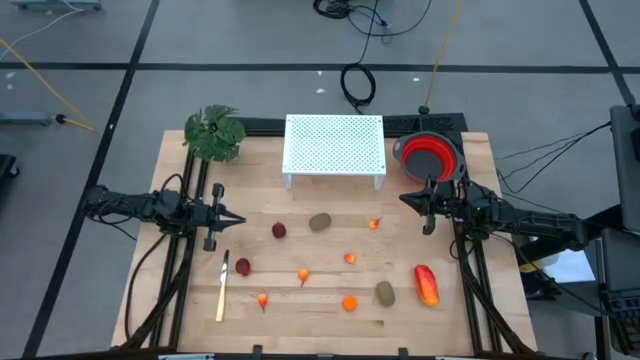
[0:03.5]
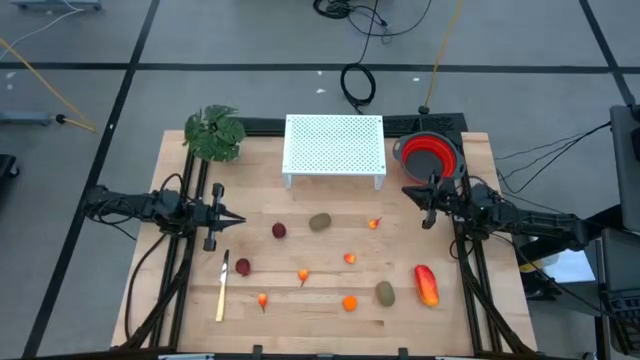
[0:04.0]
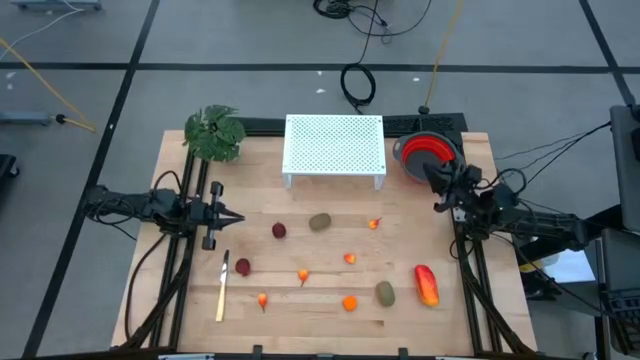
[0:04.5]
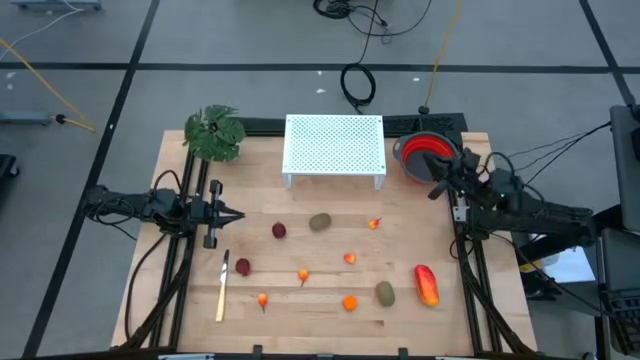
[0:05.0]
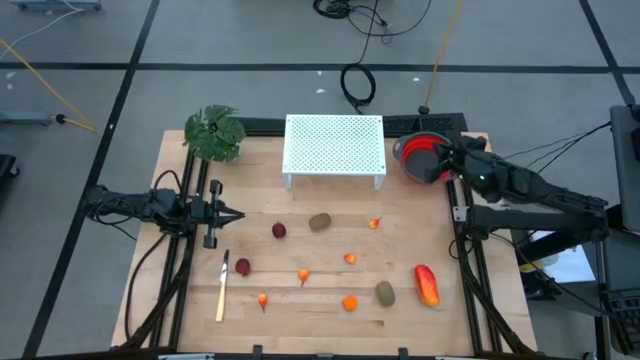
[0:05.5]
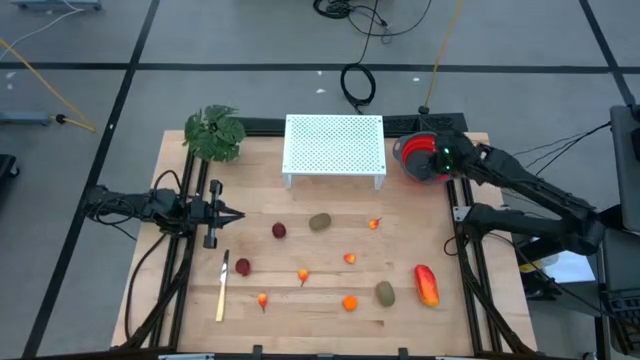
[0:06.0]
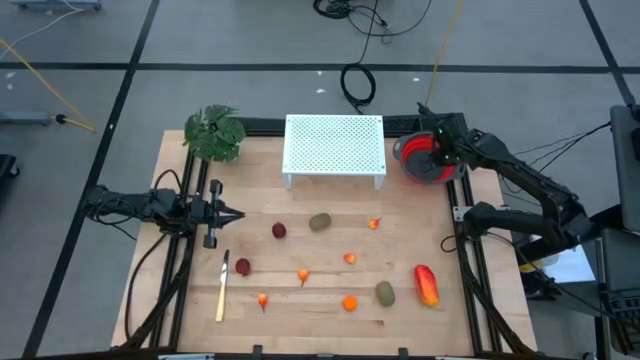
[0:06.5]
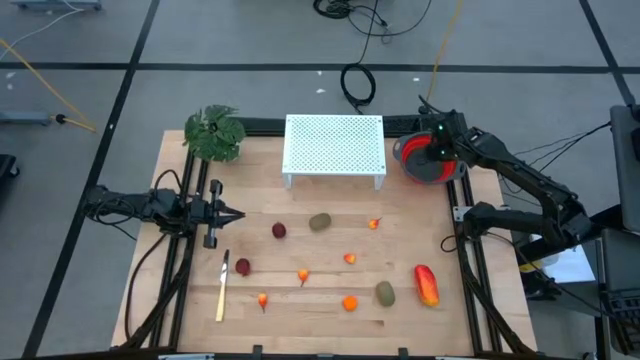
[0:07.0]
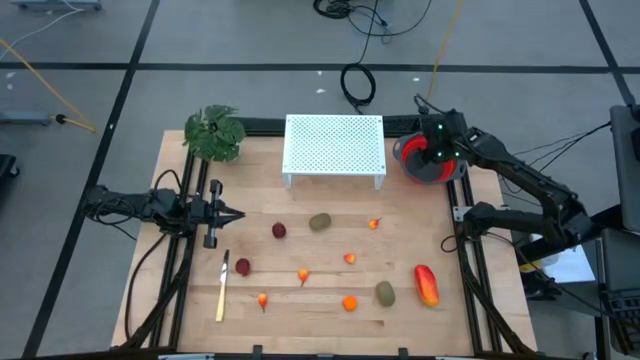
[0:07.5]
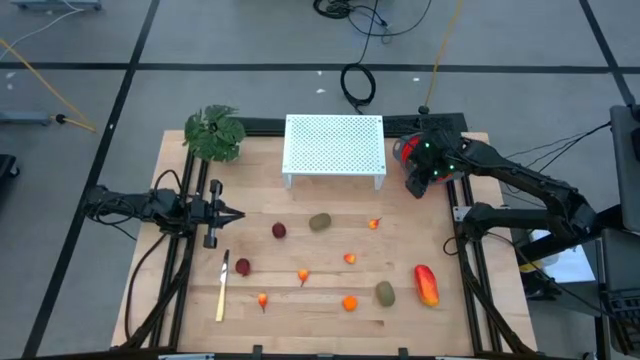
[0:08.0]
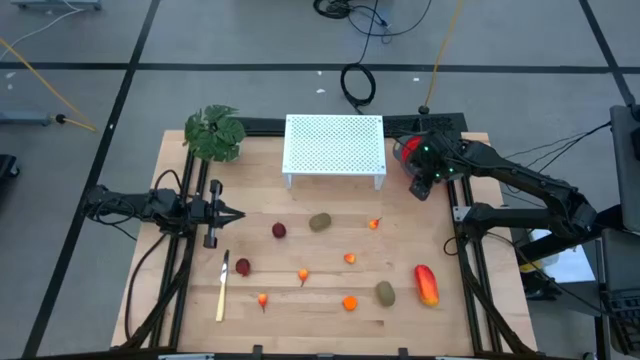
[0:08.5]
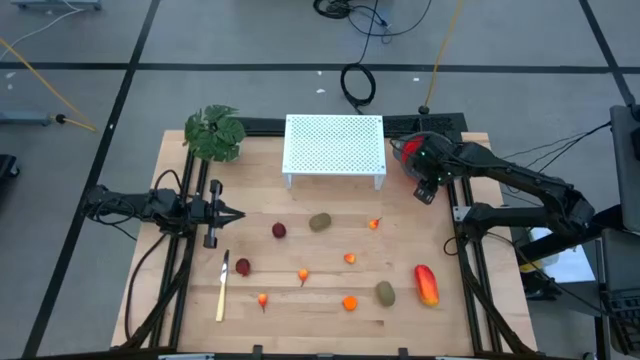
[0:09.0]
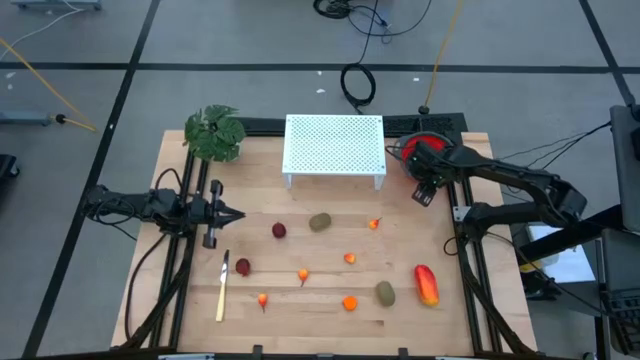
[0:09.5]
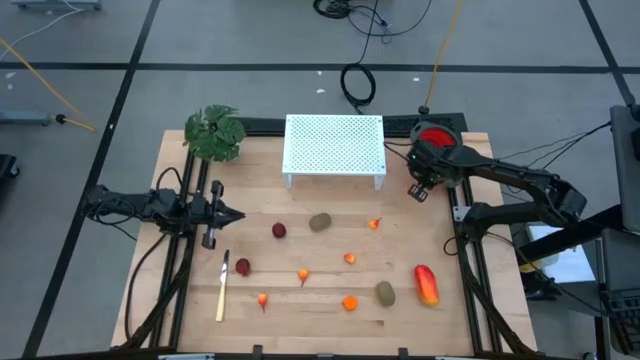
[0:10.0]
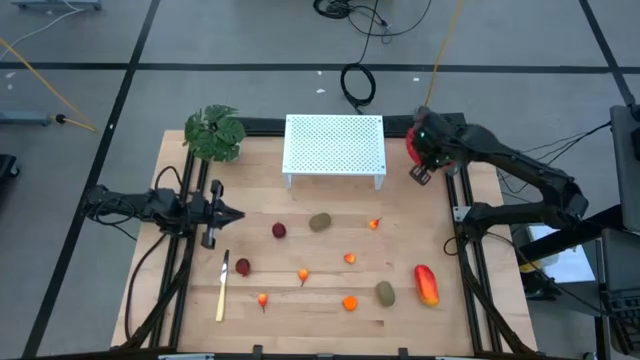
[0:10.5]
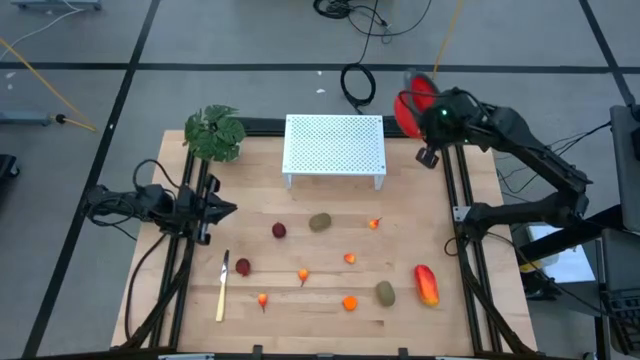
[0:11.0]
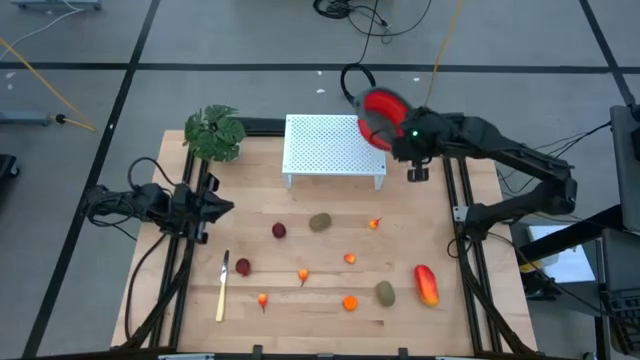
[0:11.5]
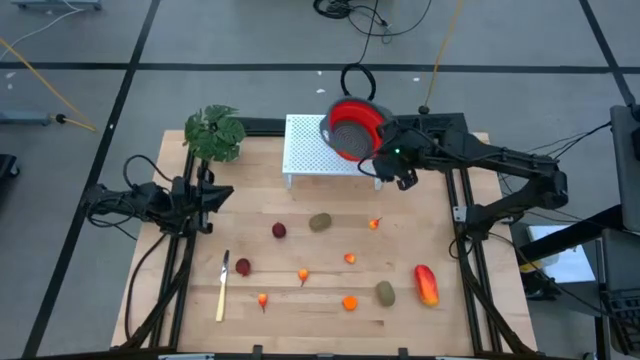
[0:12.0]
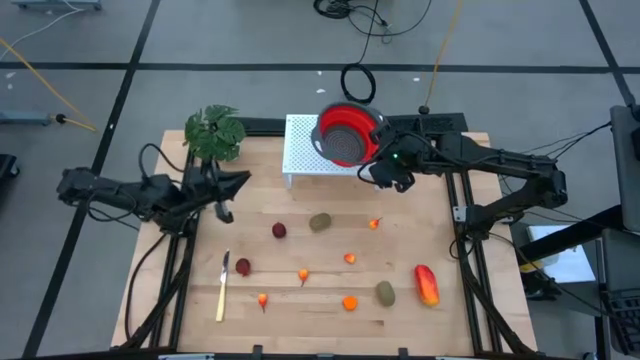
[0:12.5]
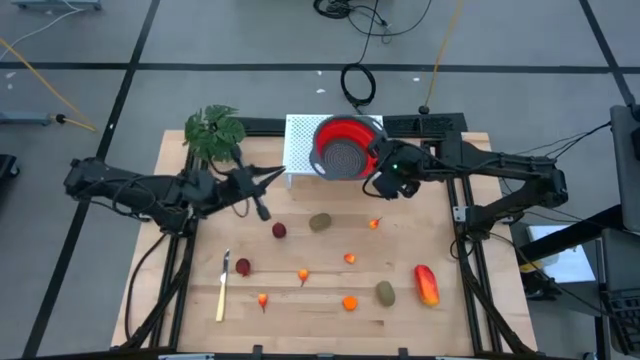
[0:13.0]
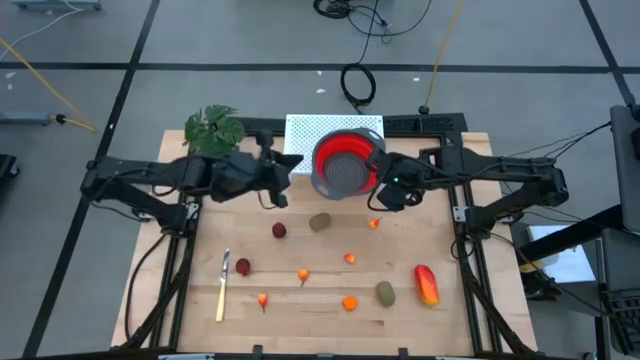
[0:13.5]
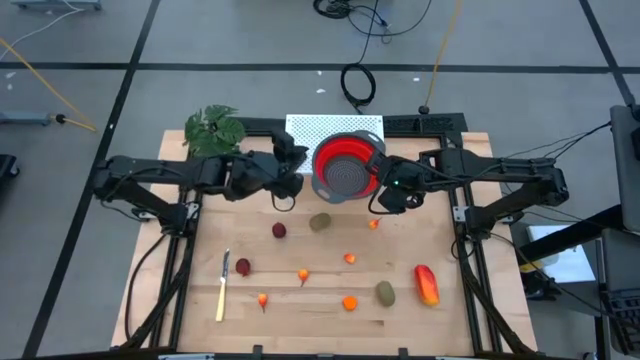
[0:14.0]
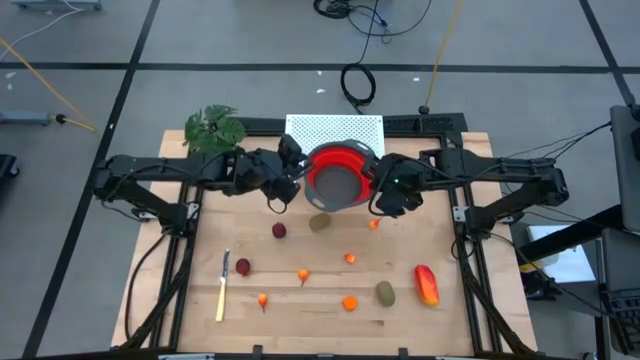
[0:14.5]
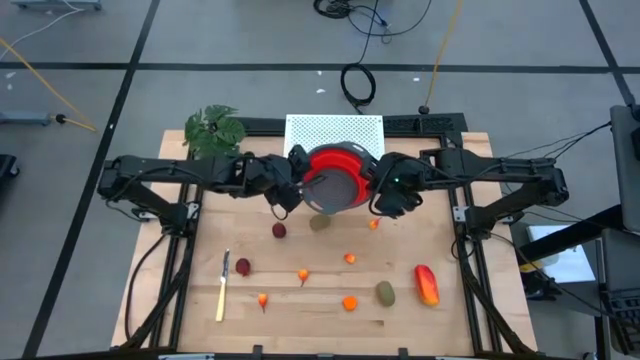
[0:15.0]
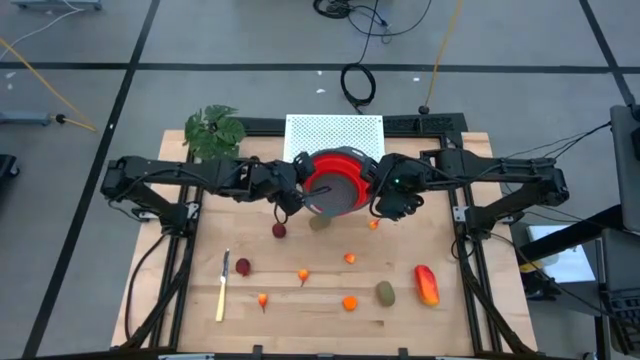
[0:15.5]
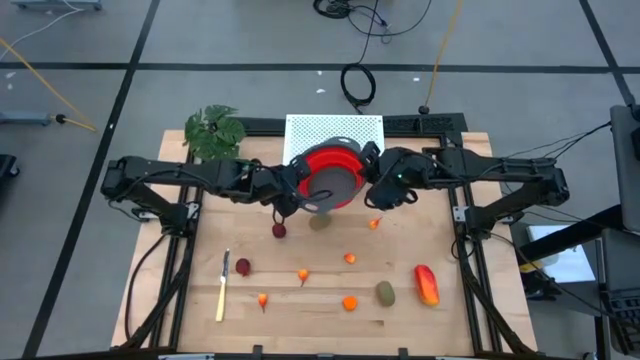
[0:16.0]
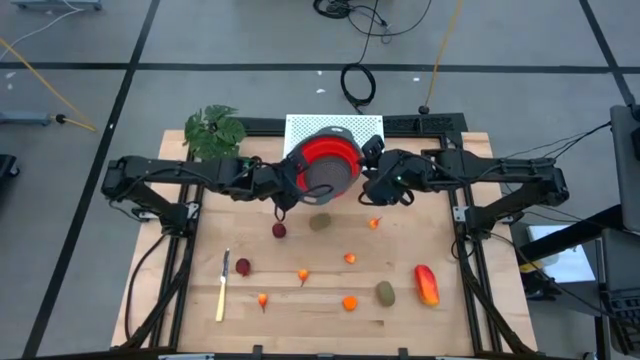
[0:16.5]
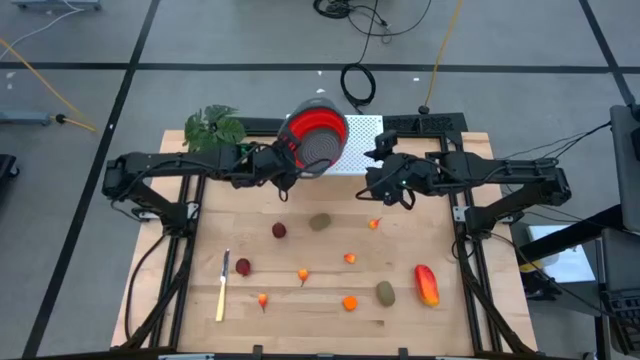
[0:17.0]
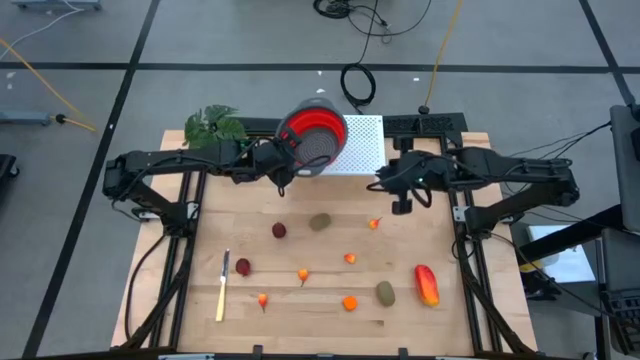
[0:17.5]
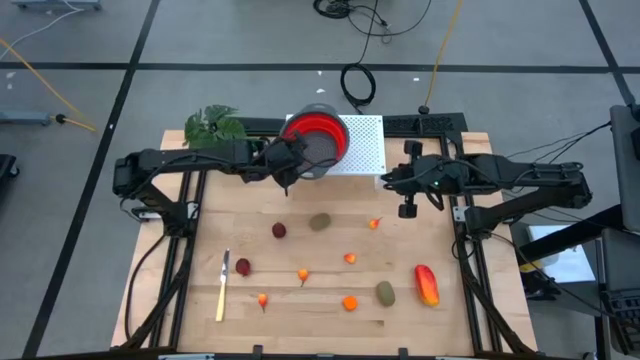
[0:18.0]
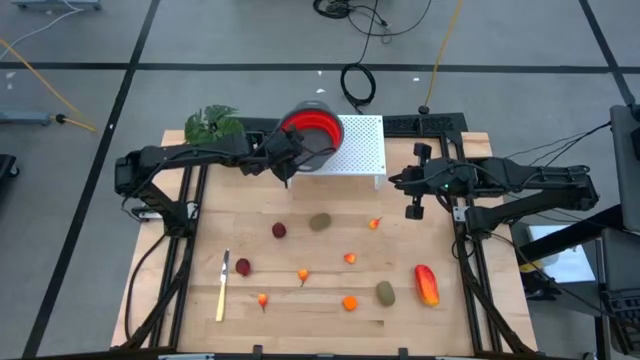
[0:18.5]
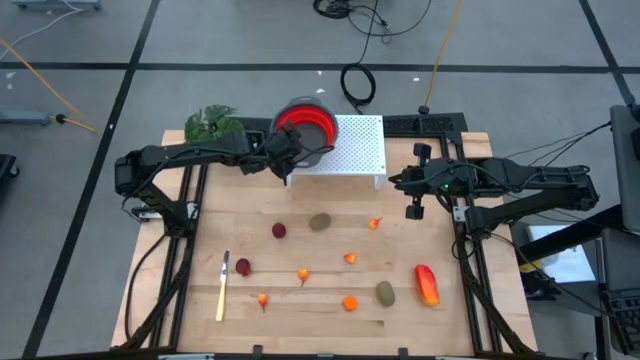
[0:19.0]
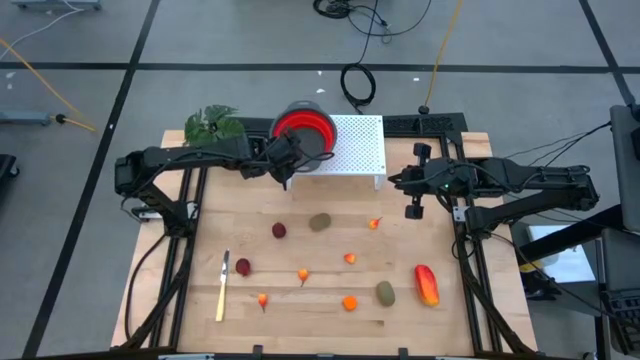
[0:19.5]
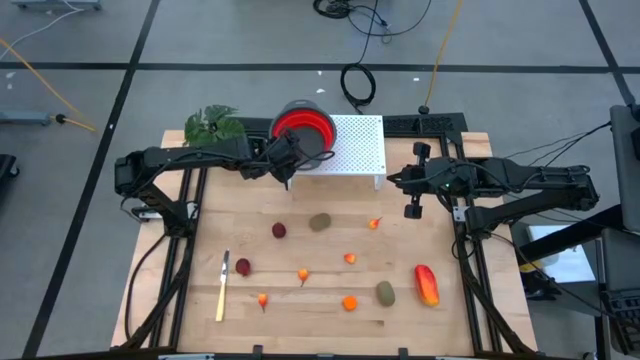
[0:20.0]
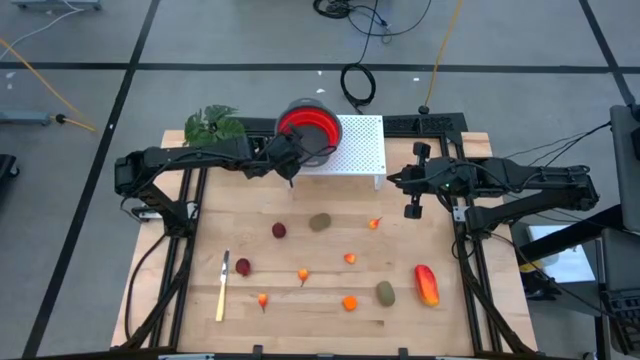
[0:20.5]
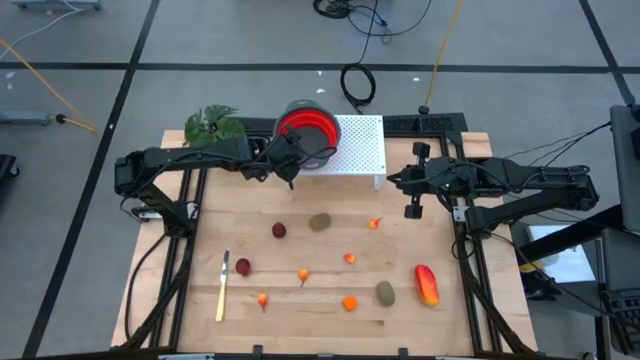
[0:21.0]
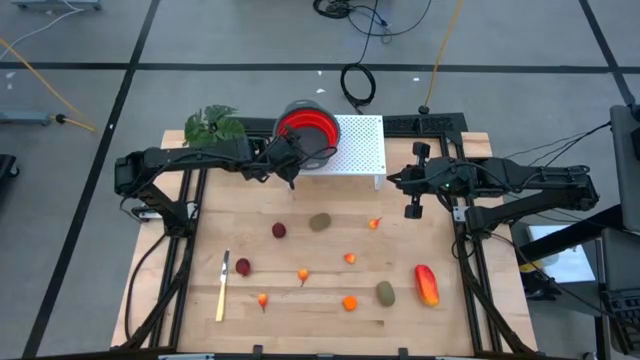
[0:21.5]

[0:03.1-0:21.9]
Task: Pick & Place Fruit
Put the red strainer bowl on the shelf on the shelf

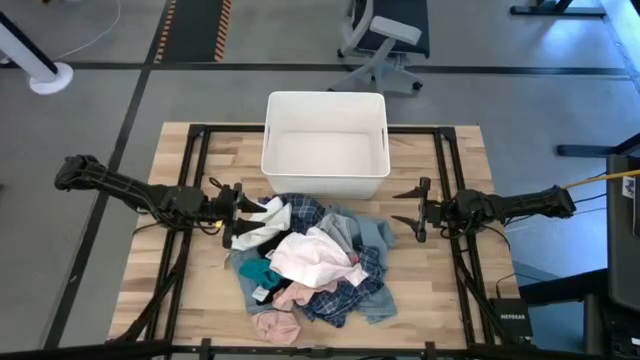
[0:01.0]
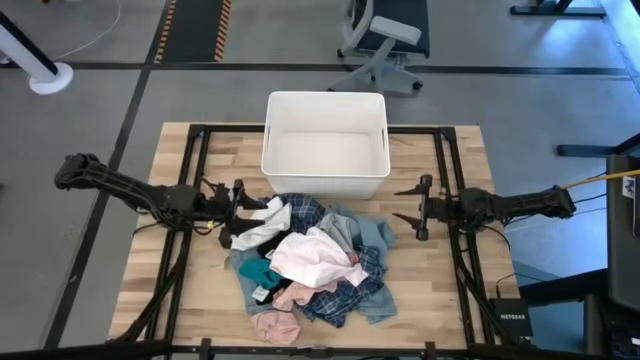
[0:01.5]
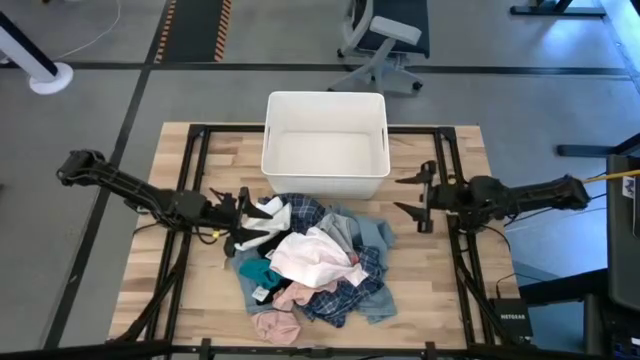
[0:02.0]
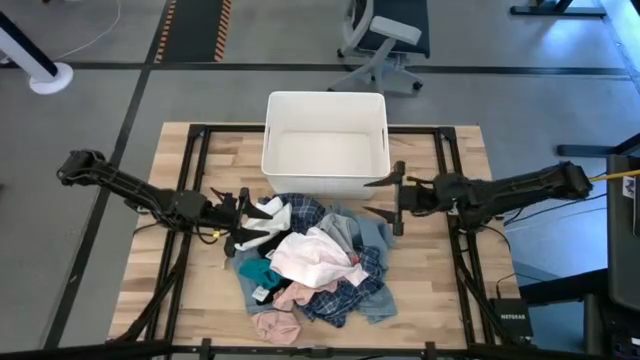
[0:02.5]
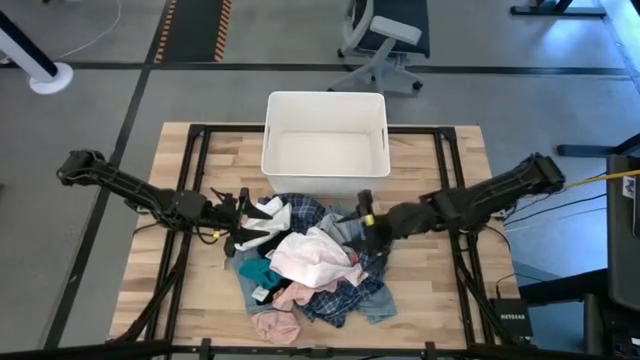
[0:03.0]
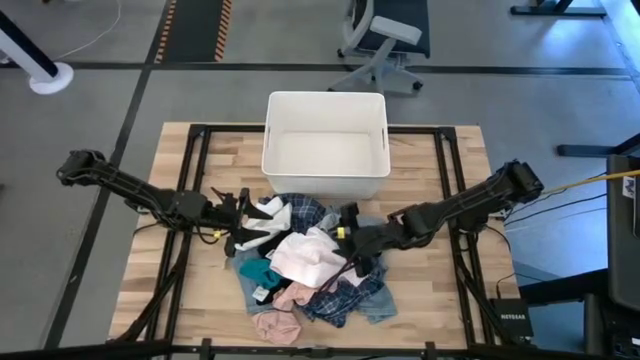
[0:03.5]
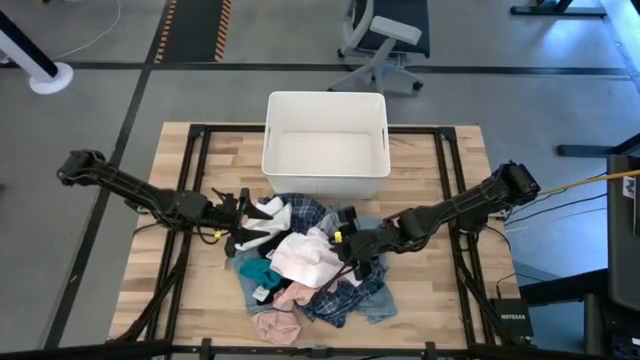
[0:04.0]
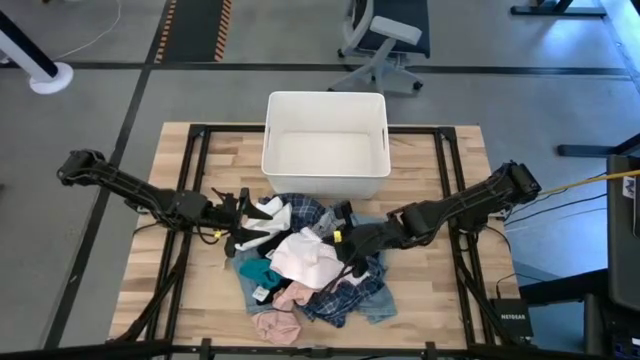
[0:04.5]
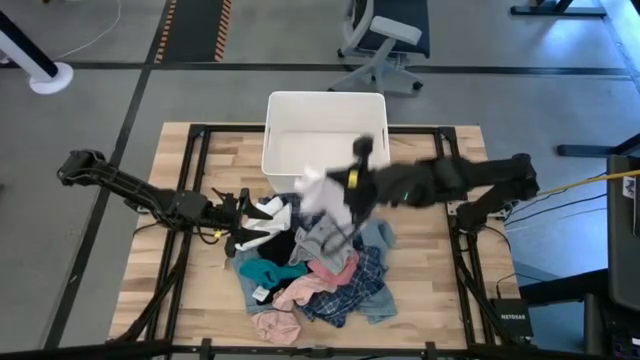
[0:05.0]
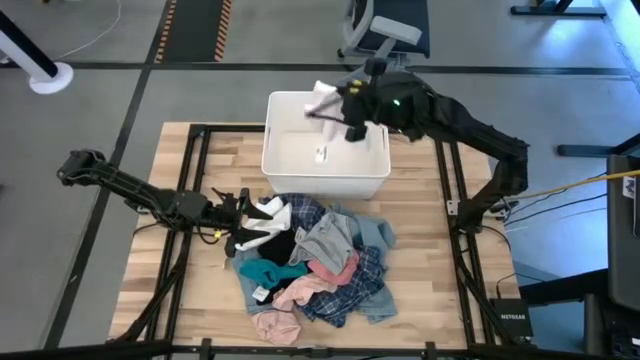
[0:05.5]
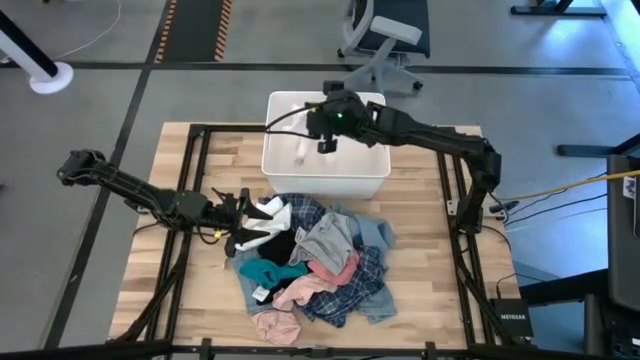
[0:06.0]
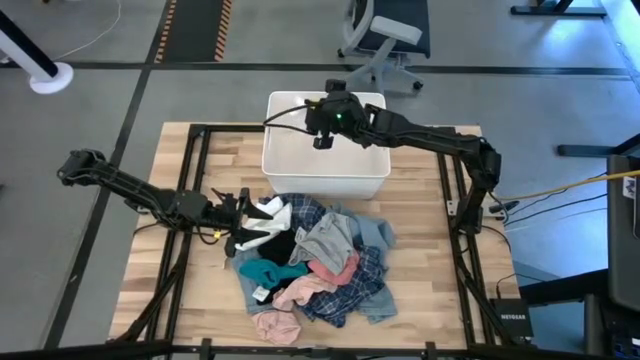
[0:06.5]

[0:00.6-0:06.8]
Task: Sort clothes
Put the light pink boxer into the white laundry bin
